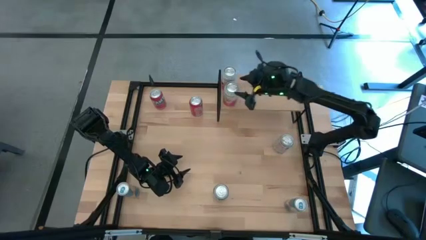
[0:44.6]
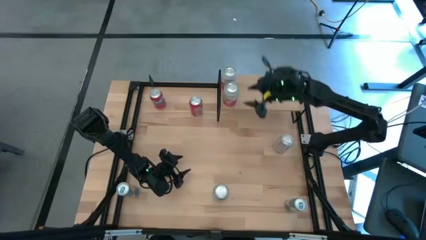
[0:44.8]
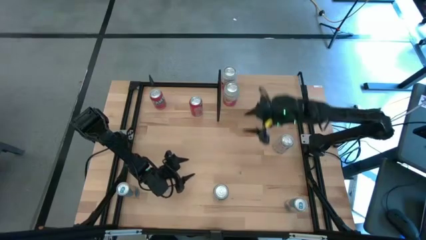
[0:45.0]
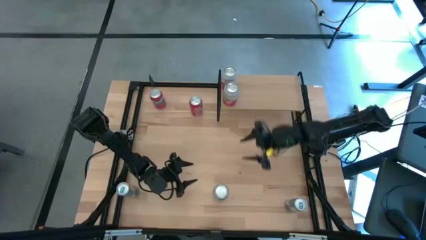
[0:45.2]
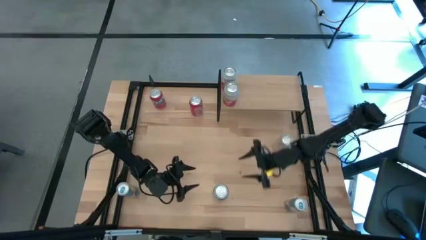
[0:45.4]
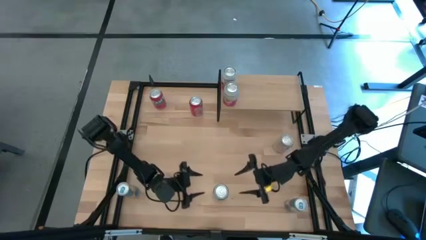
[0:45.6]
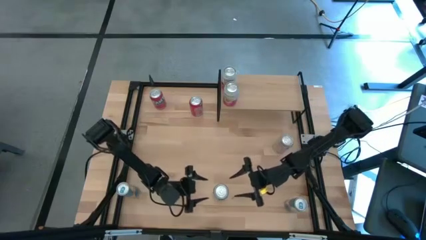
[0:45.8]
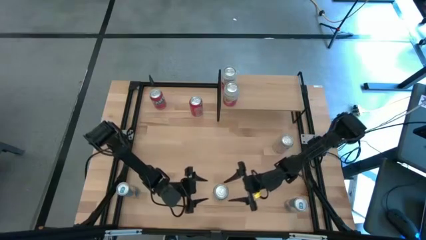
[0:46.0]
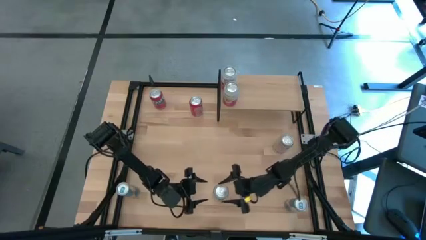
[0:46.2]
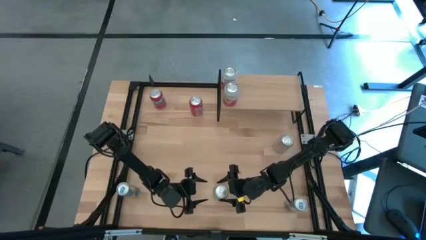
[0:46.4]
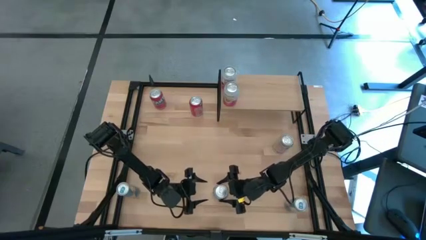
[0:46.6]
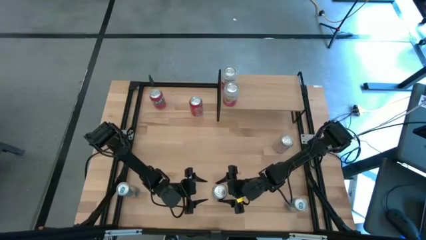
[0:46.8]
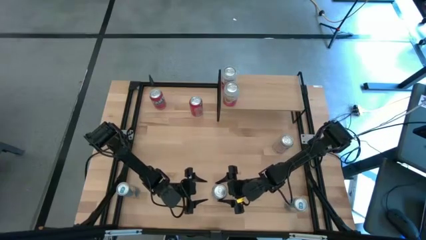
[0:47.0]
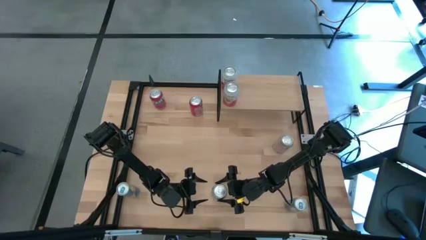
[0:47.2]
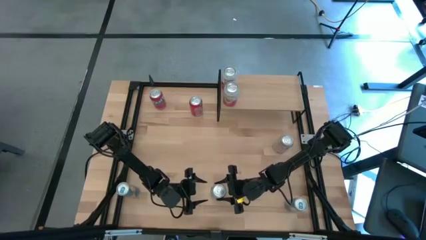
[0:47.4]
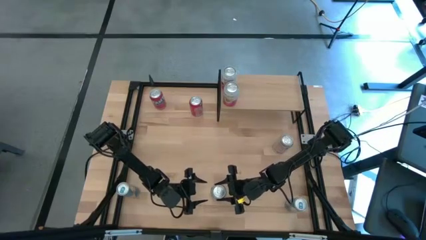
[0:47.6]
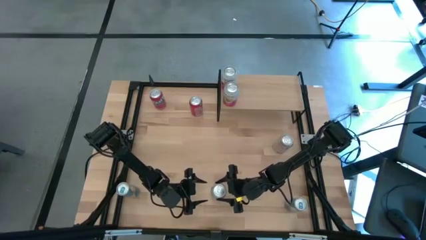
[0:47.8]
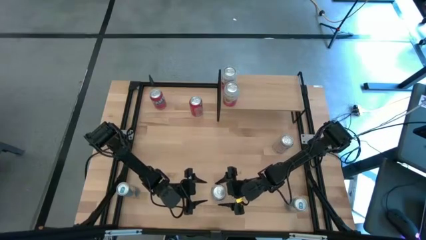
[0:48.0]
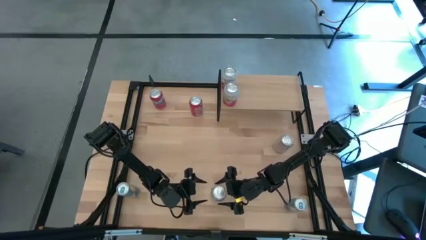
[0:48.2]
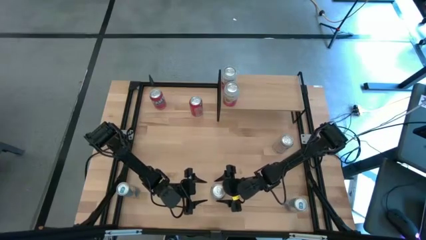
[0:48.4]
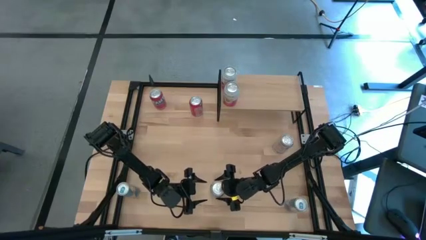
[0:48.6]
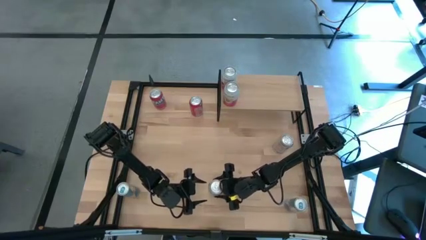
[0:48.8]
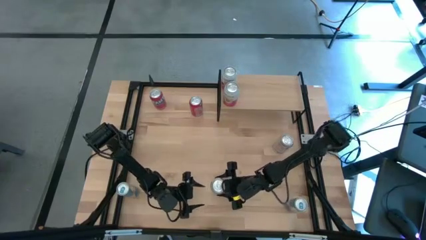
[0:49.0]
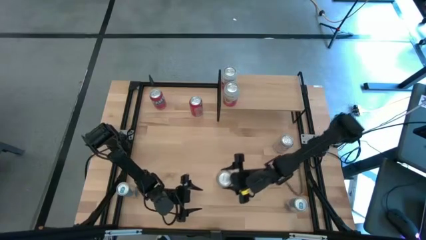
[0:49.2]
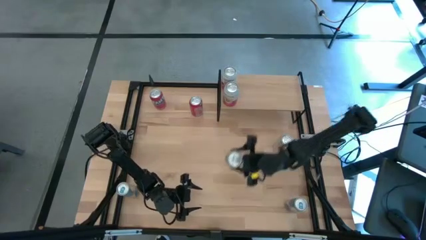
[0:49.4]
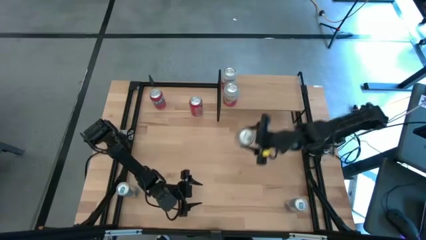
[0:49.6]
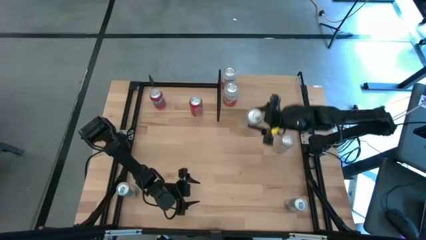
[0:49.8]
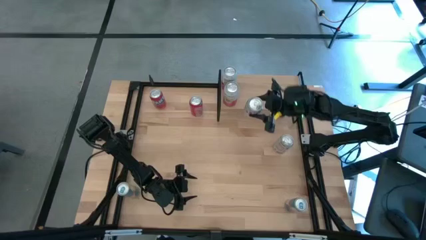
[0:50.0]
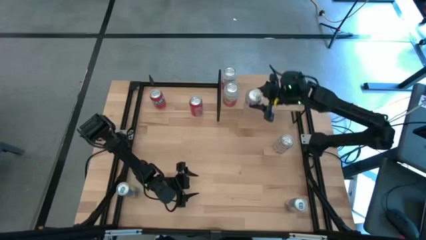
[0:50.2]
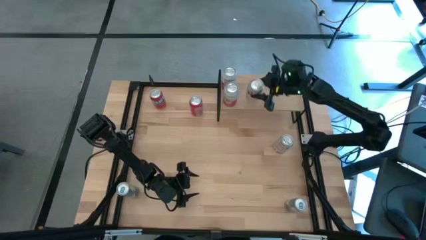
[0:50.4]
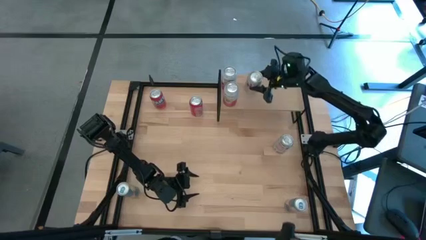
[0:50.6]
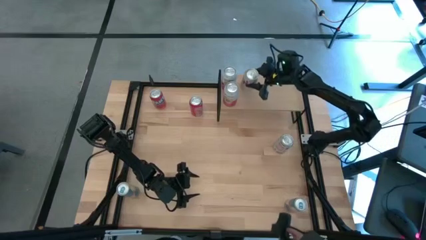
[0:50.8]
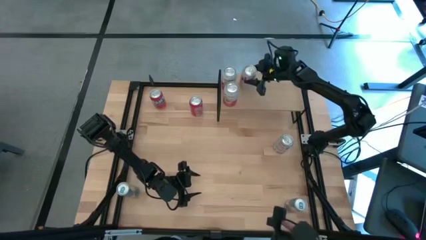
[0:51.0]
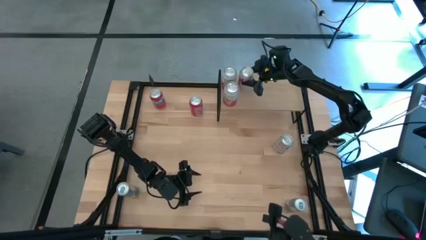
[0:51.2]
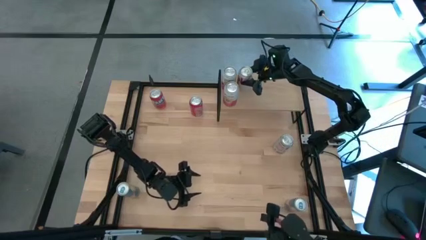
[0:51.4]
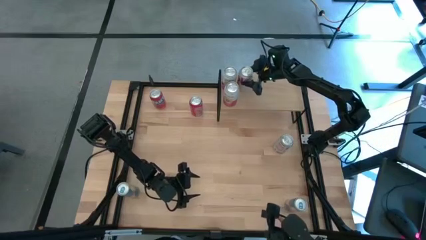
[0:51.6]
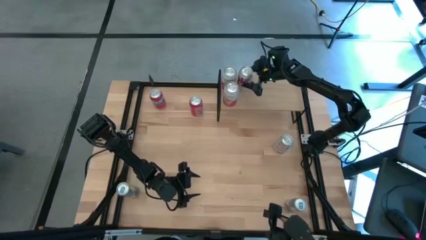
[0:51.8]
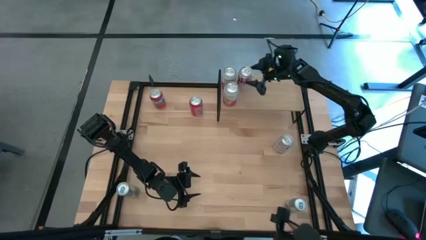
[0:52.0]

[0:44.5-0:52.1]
Task: Place canned beverage on shelf
Put the bottom silver soda can on the shelf

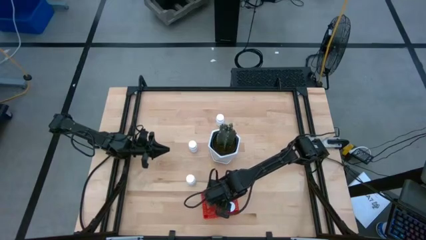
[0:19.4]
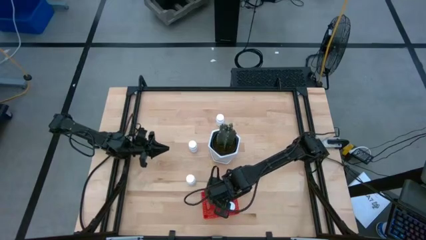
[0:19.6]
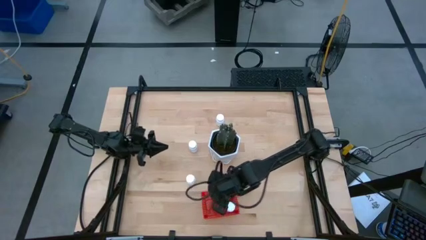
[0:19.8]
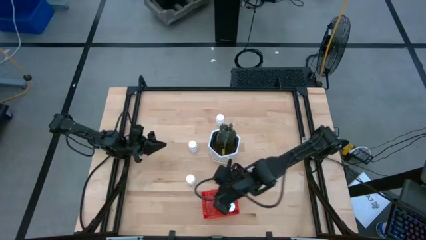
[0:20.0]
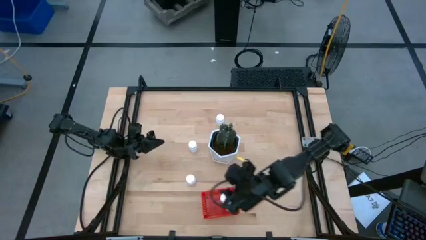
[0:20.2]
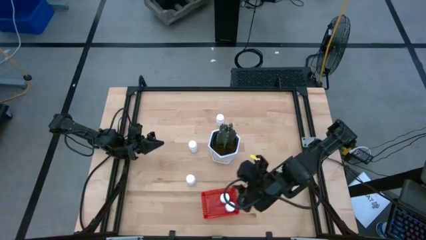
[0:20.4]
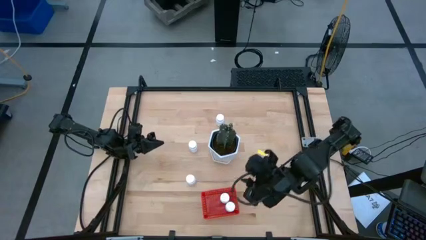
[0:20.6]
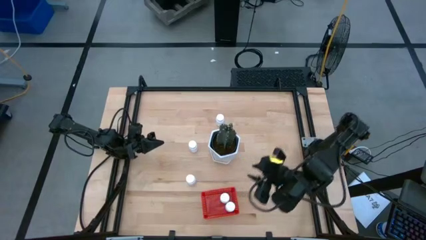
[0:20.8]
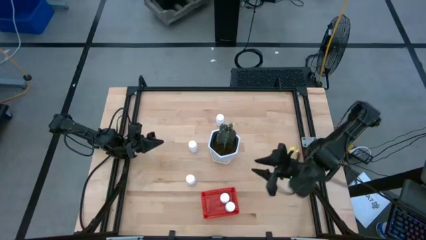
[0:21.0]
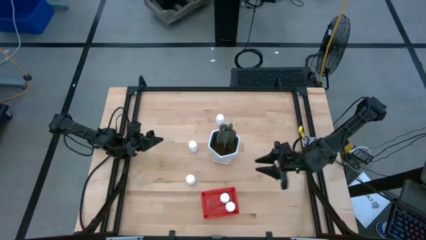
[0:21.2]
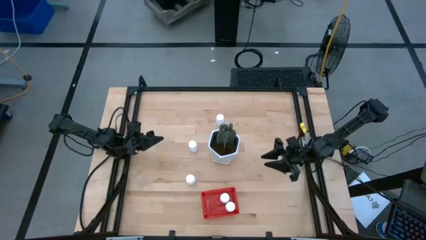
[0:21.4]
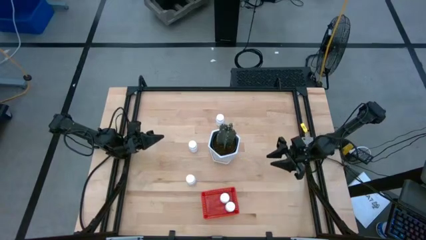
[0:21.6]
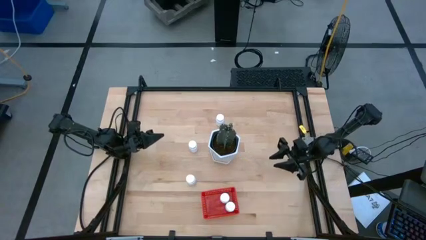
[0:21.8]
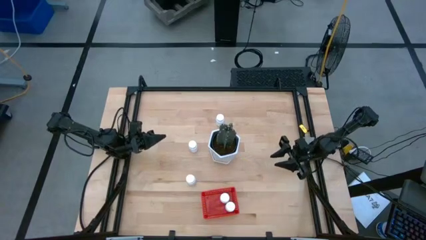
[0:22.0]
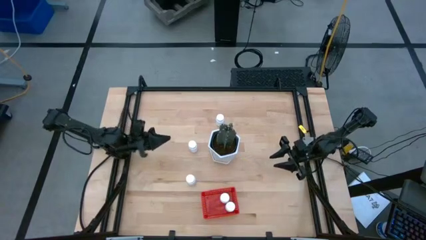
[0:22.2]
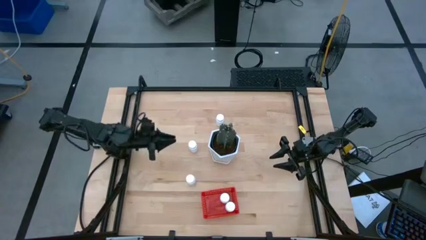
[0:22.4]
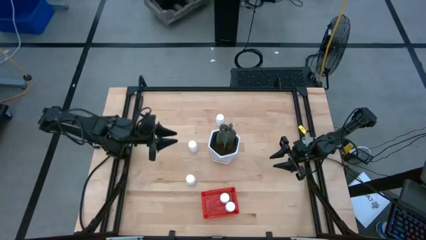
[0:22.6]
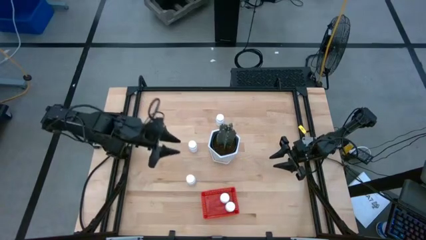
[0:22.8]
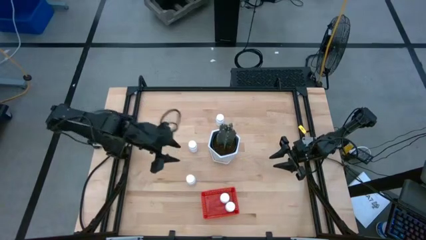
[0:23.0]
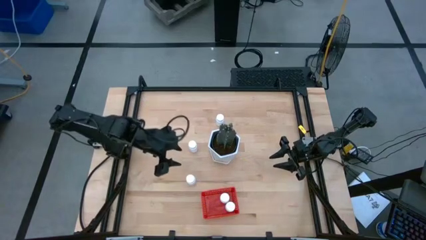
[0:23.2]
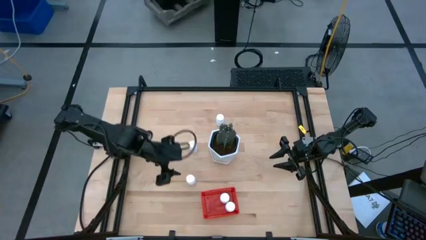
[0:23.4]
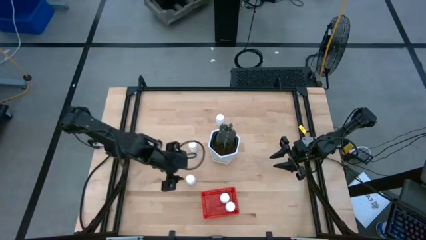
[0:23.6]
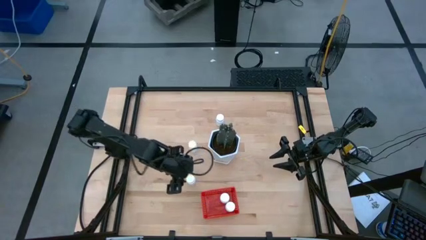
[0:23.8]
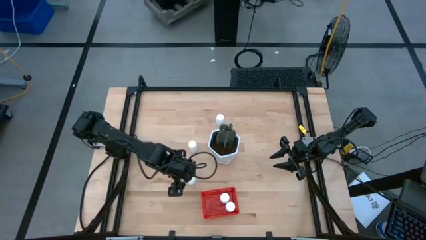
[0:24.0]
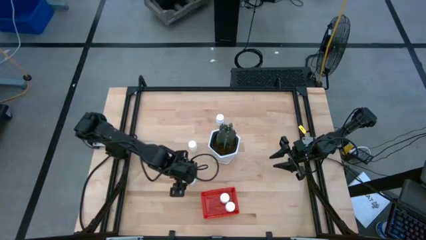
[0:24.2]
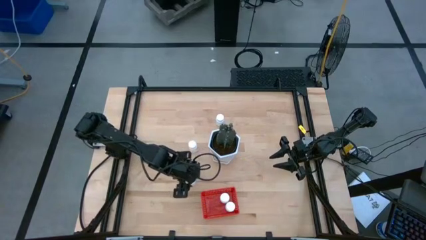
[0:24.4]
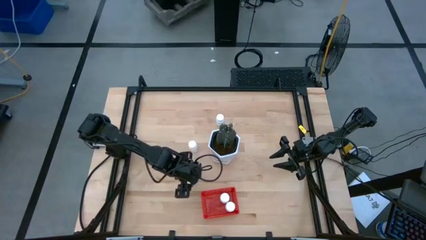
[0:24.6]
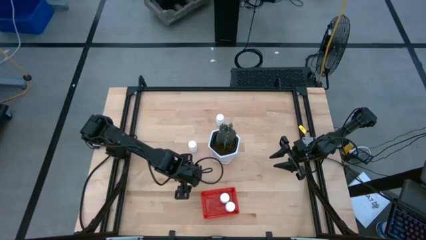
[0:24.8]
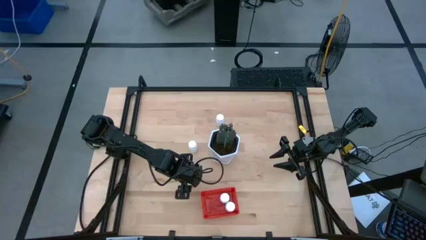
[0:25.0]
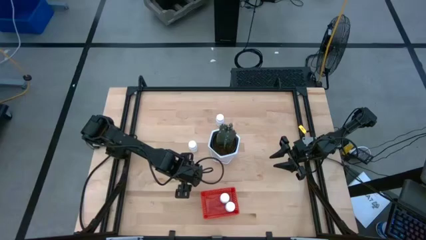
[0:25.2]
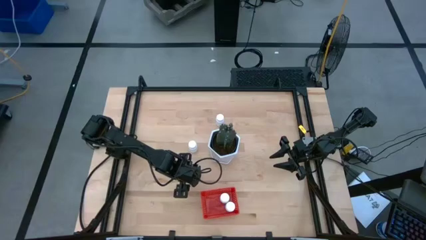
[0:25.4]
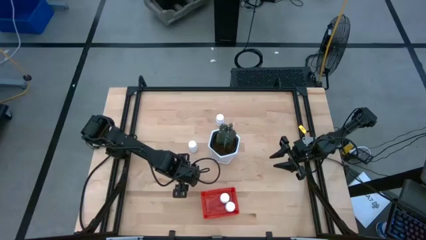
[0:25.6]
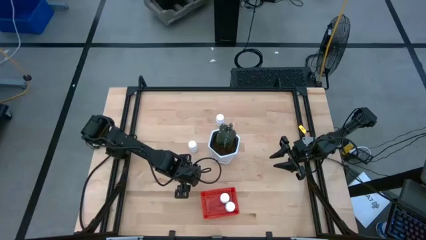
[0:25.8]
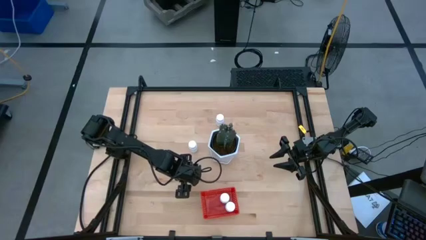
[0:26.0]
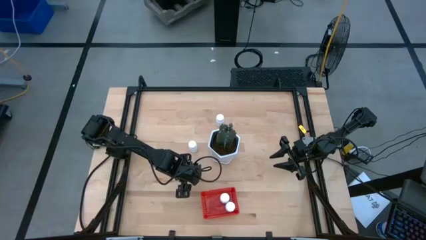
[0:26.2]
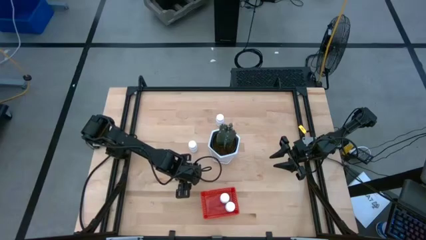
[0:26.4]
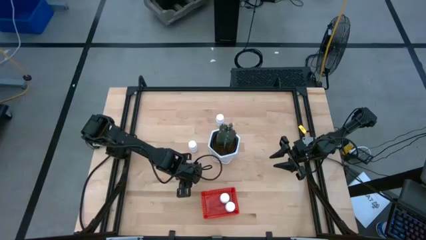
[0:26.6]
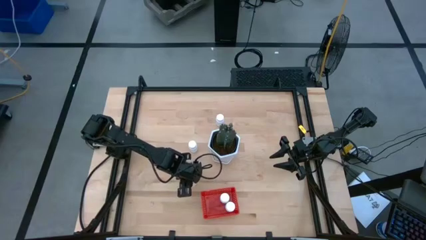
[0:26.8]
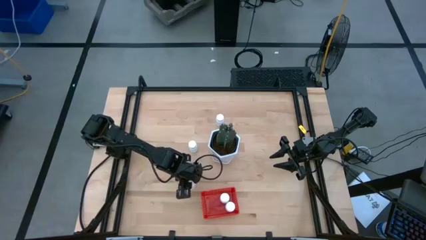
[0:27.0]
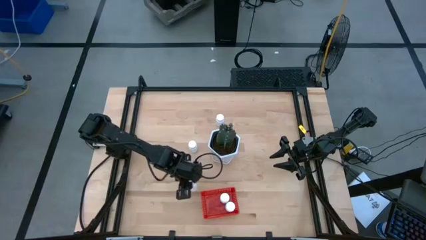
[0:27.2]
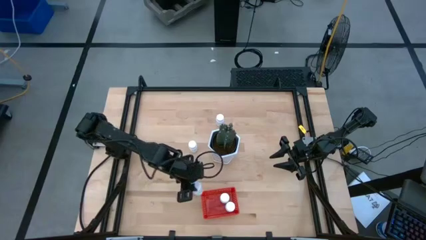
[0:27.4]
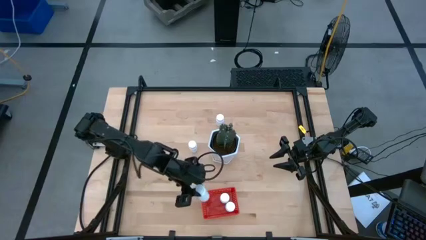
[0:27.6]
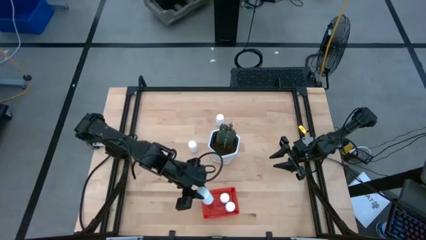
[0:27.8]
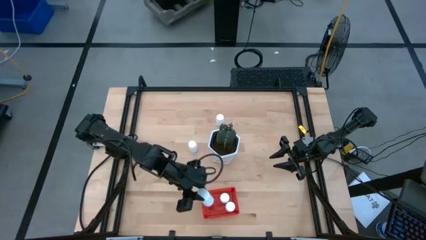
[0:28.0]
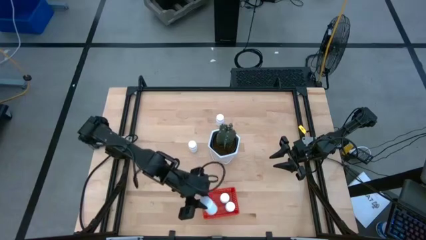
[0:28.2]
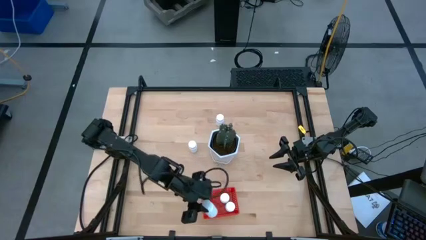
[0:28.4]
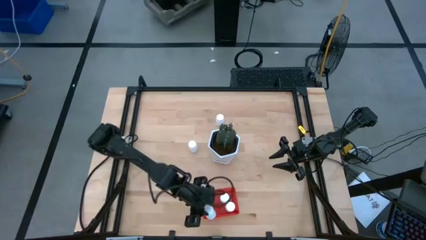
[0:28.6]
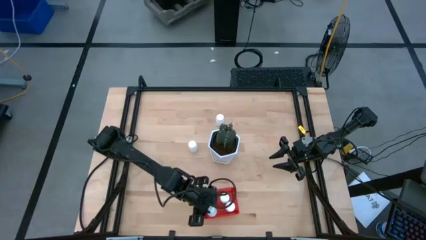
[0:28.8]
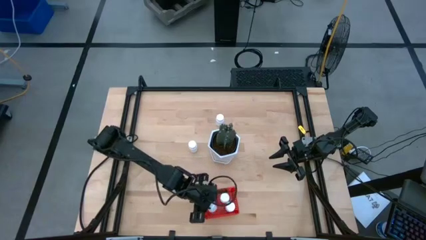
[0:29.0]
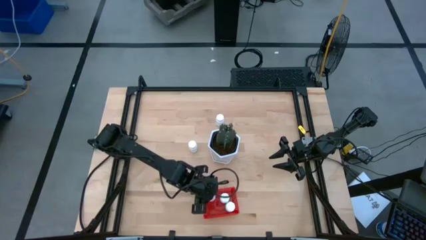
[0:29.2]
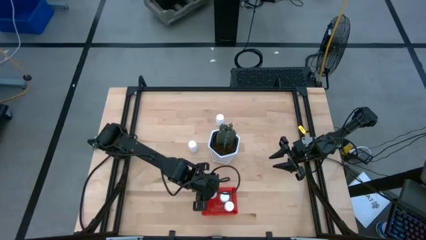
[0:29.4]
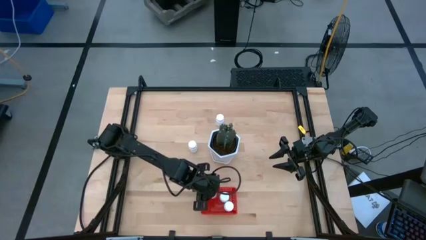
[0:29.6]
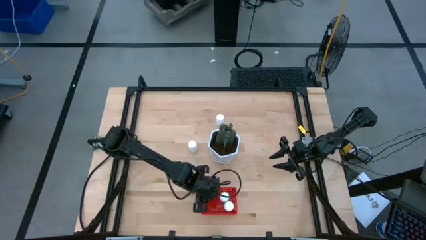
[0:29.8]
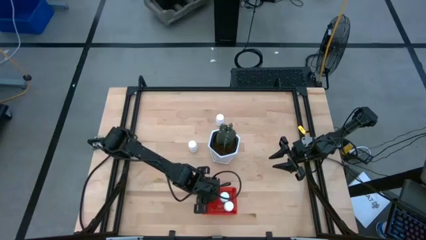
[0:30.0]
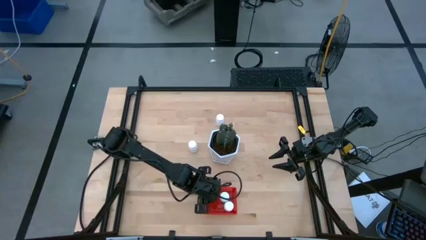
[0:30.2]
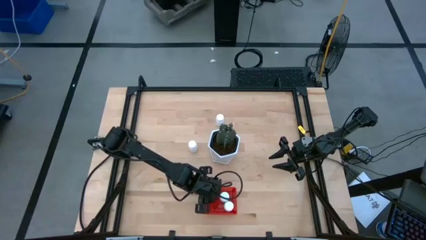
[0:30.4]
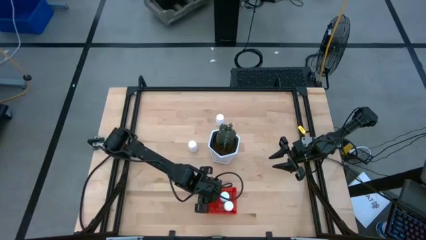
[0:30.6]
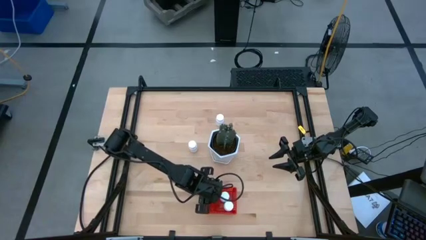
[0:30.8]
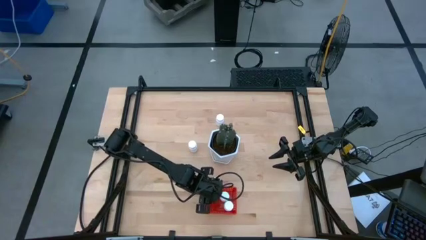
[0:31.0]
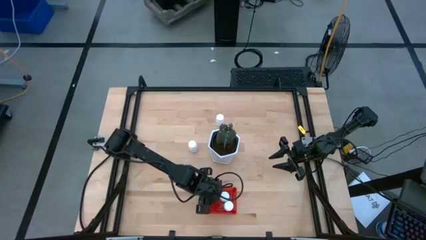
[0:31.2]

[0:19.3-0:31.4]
Task: Pick and place pill bottles into a basket
Put the white medicine bottle into the red bin
